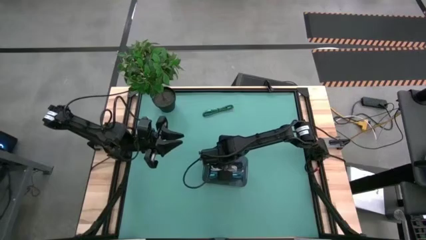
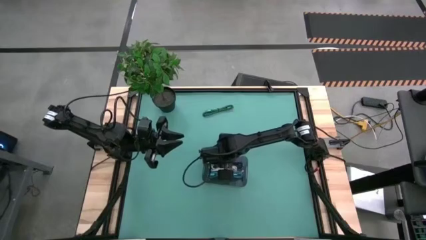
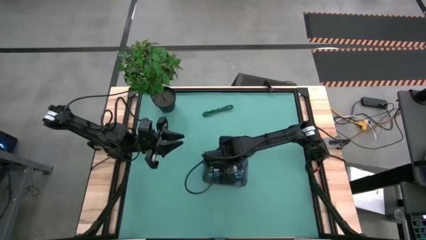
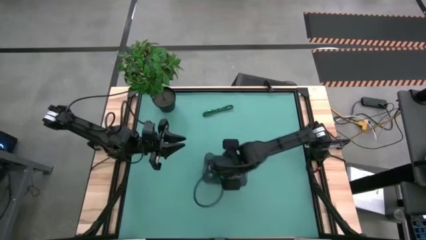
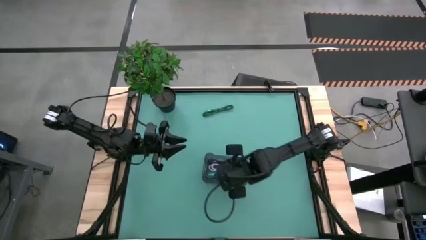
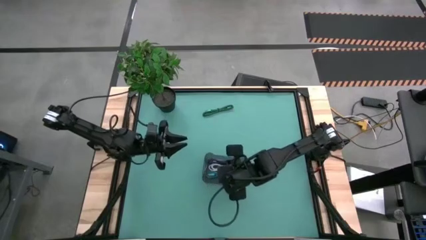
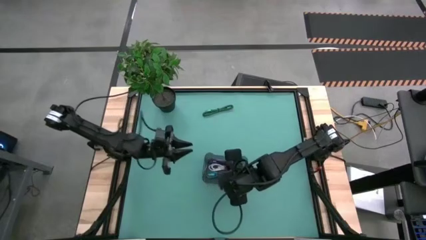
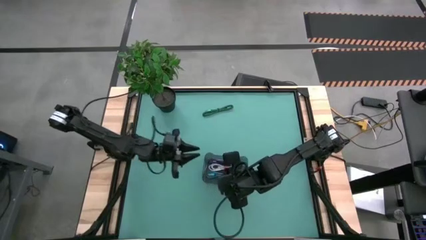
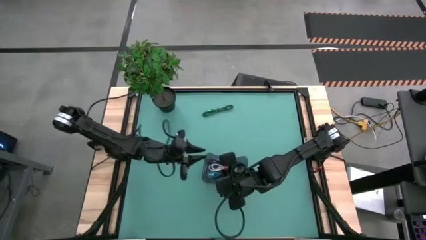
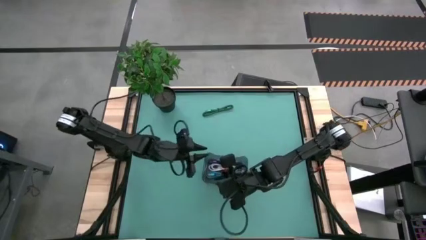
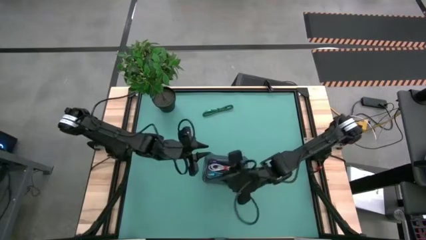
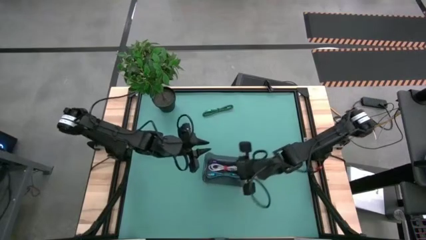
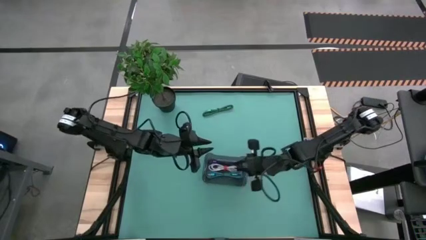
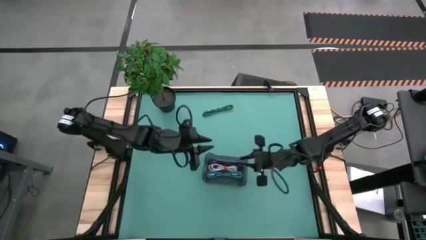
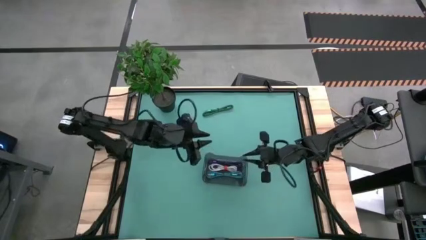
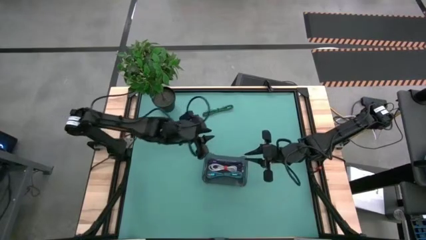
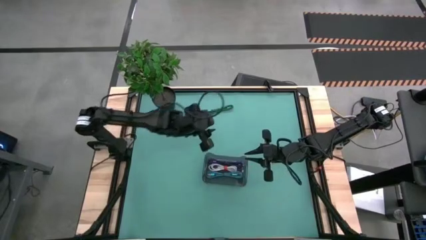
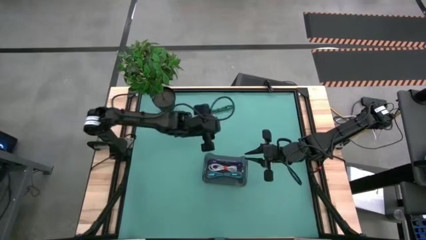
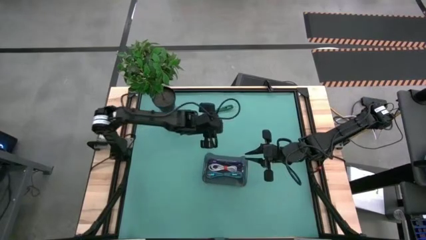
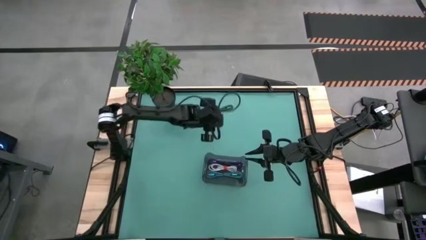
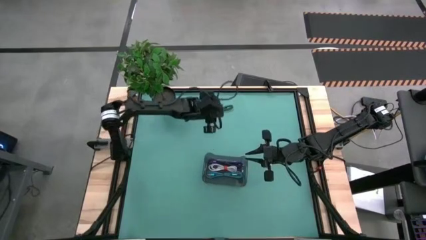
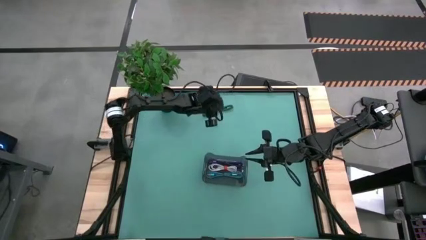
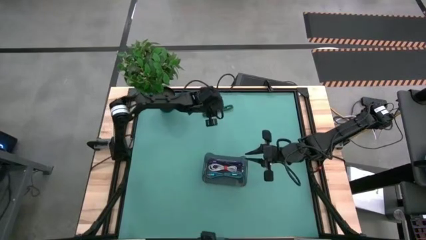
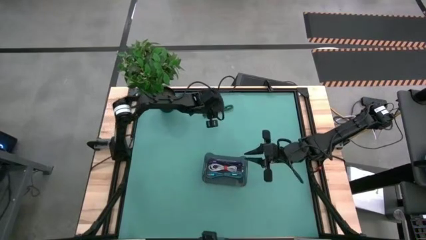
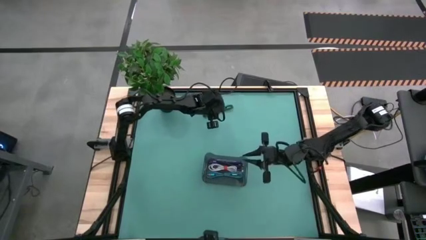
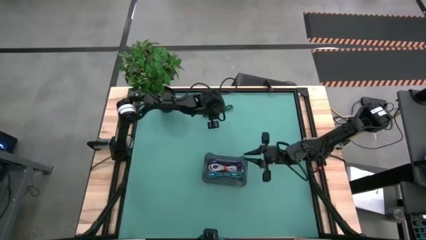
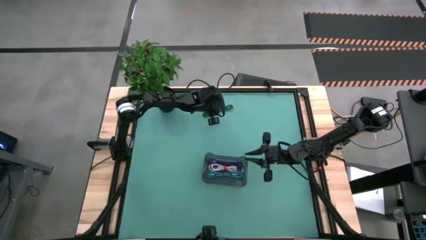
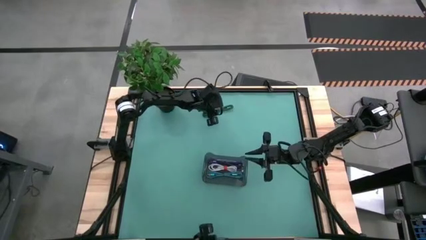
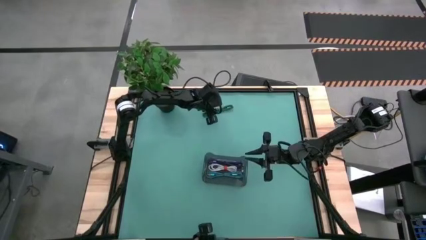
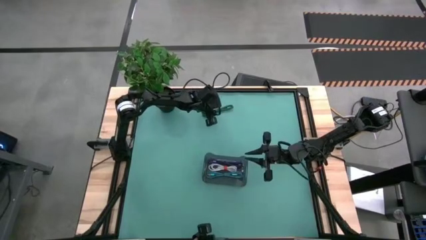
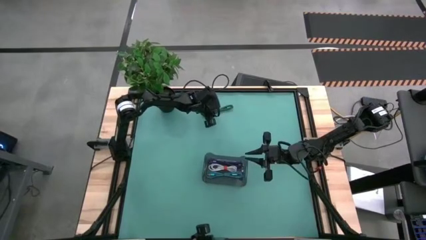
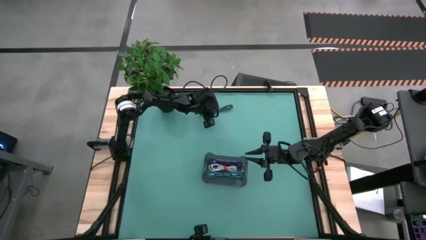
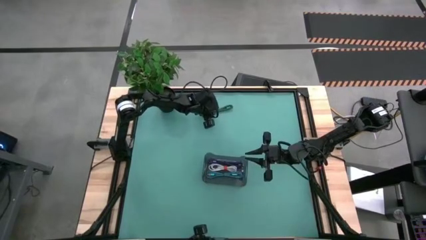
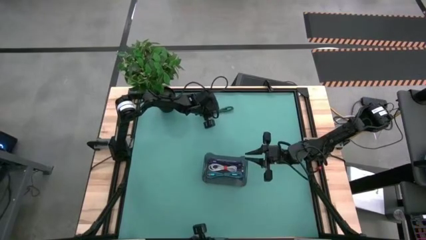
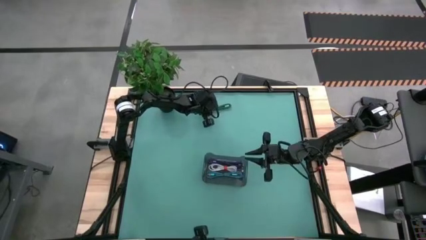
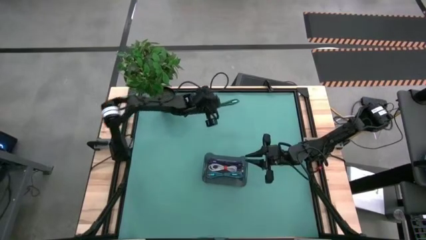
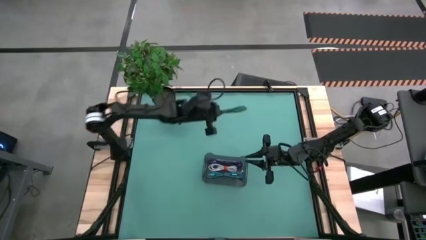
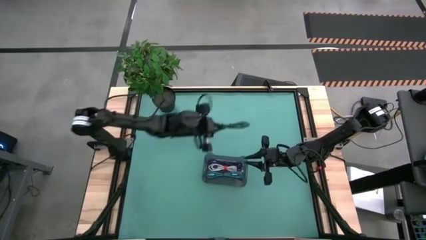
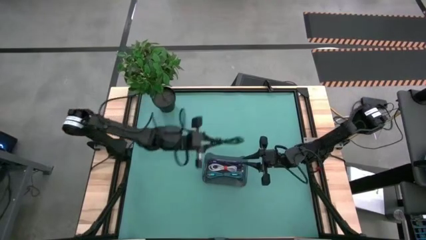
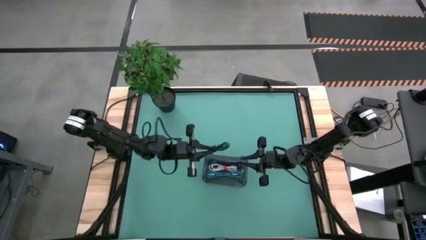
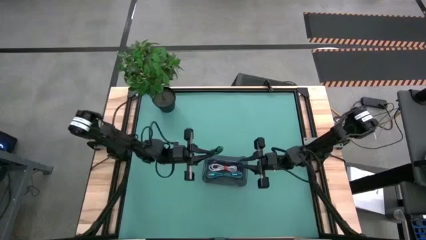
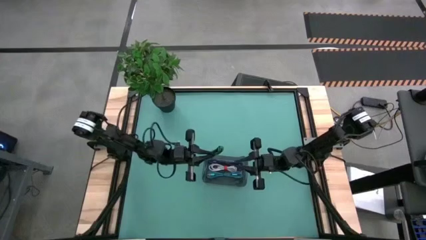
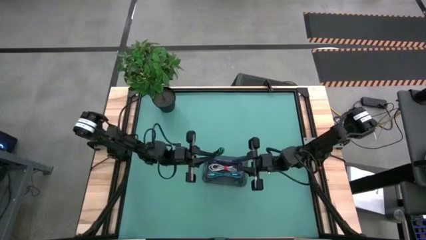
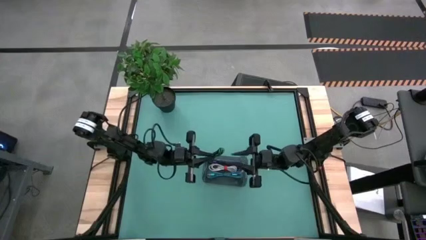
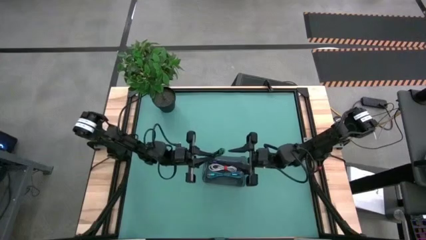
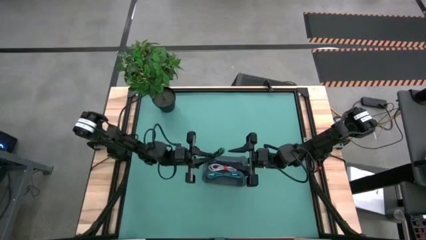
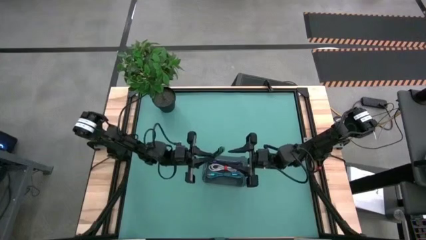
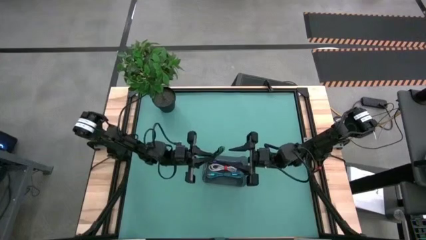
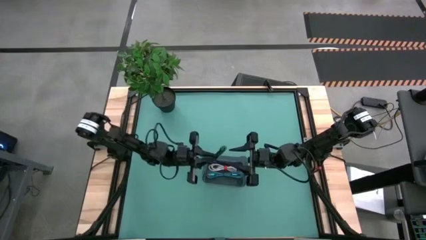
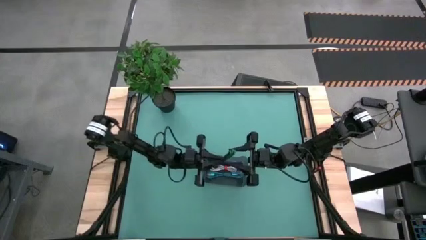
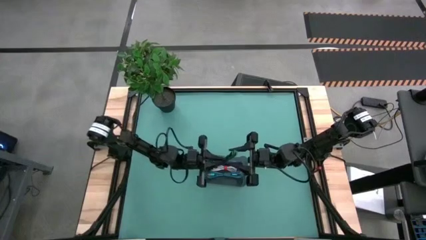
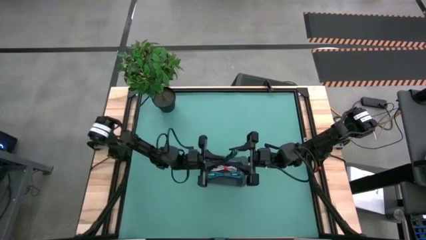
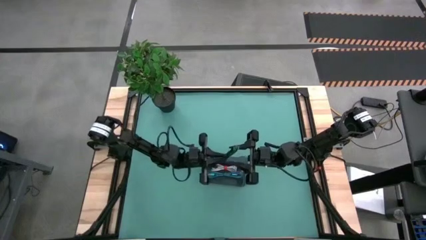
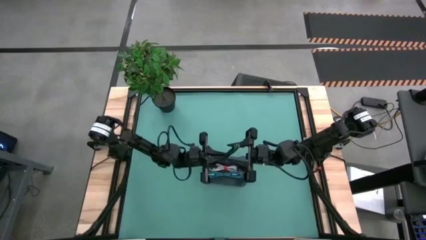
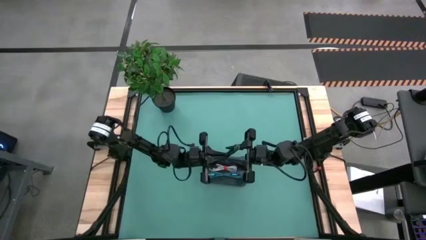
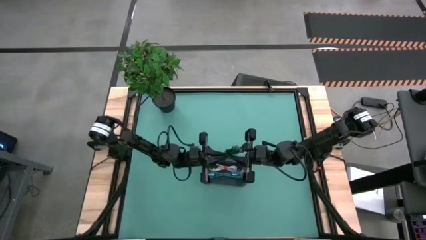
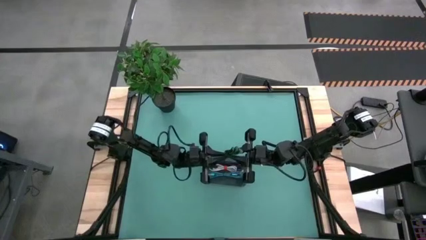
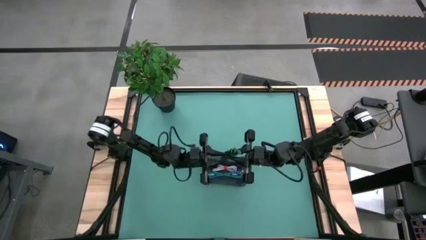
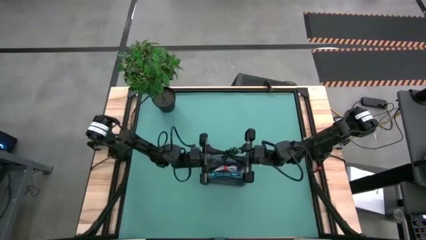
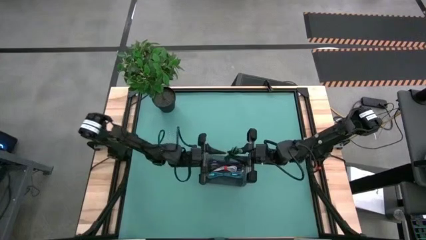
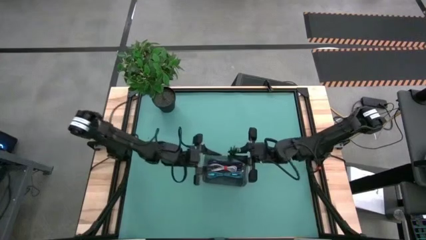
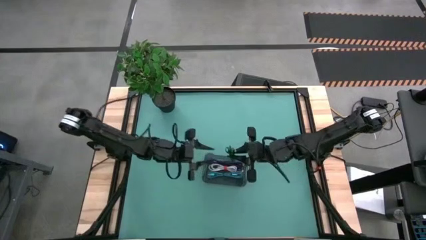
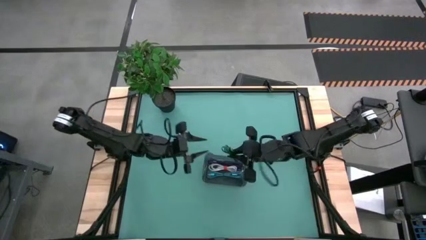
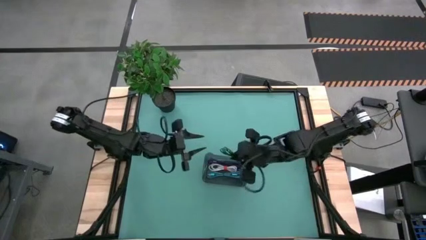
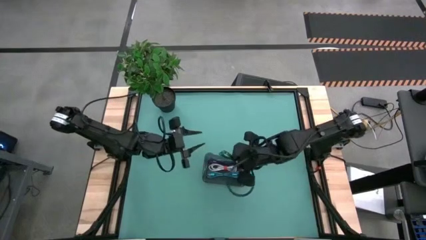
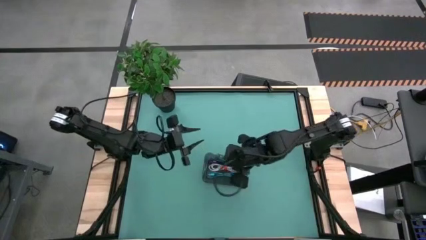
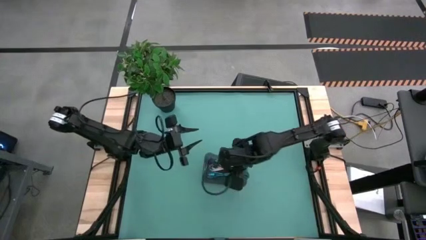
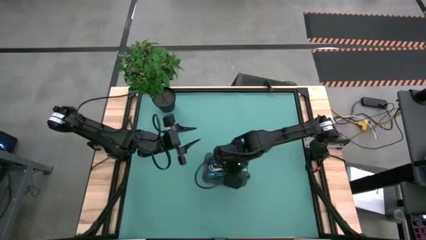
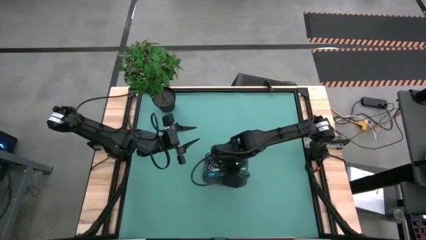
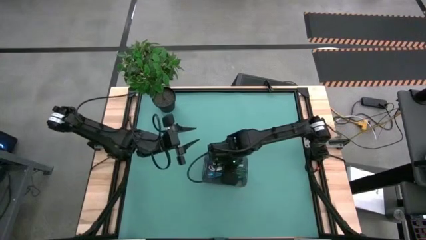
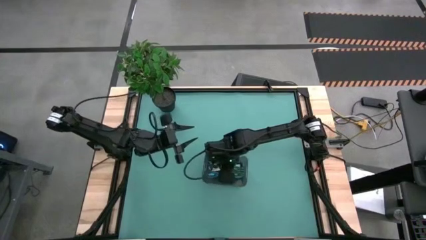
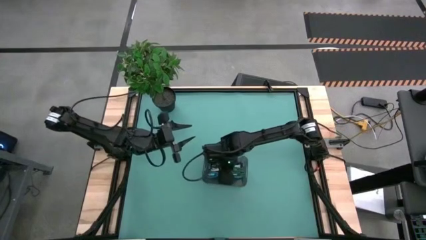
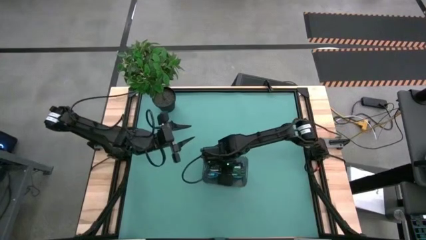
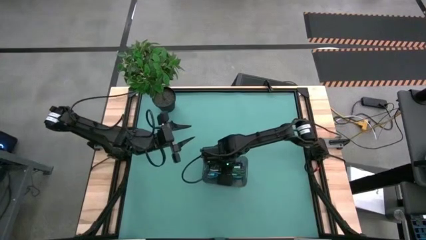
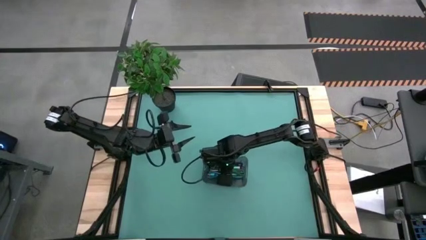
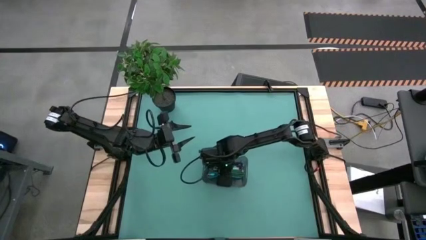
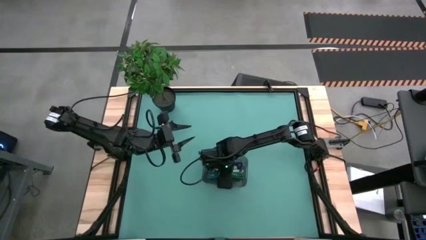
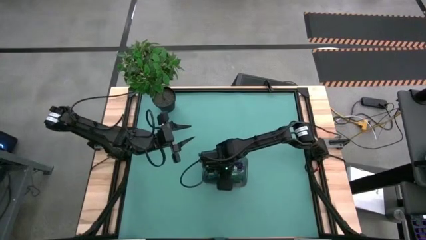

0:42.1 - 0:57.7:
Task: Pick and place USB-C Cables
Put the black green charger cable into the black bin
